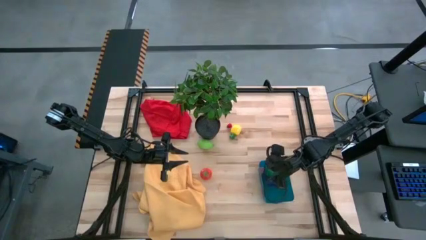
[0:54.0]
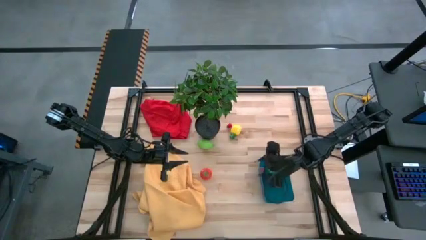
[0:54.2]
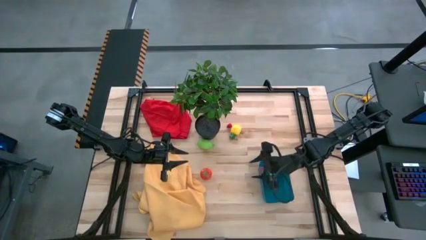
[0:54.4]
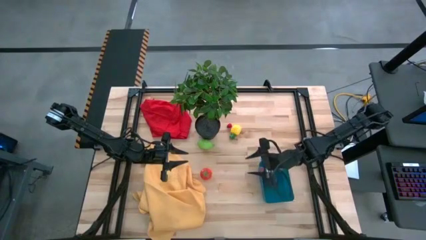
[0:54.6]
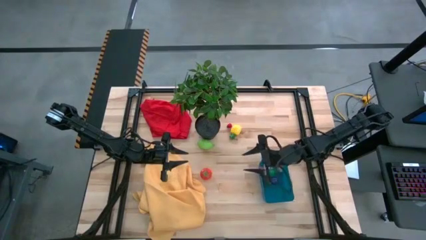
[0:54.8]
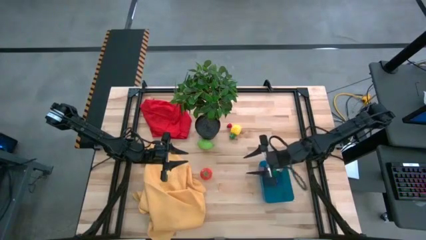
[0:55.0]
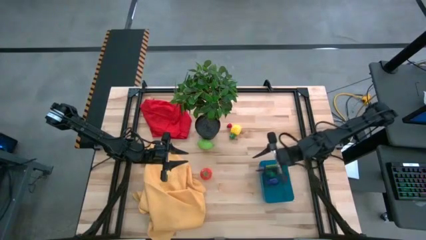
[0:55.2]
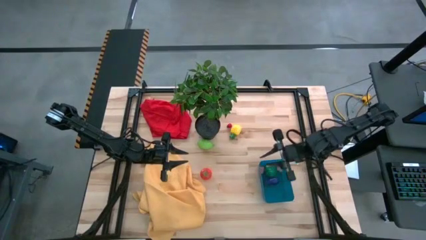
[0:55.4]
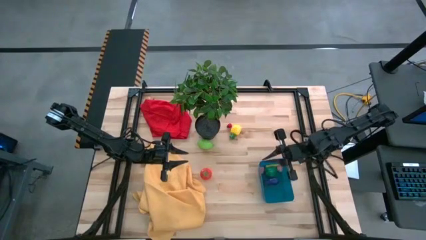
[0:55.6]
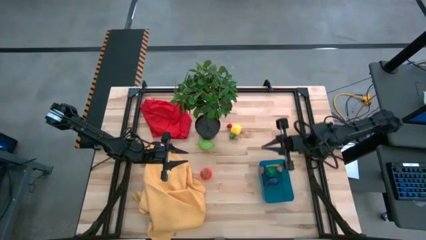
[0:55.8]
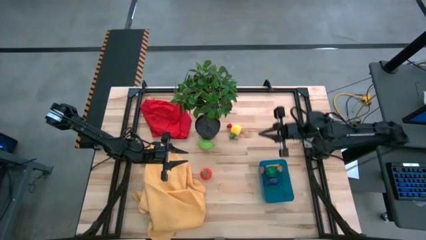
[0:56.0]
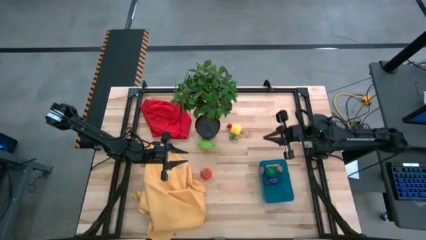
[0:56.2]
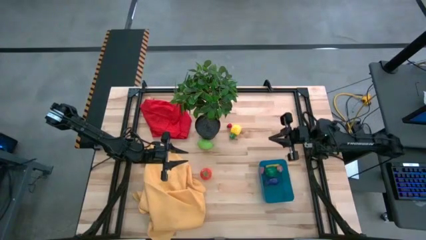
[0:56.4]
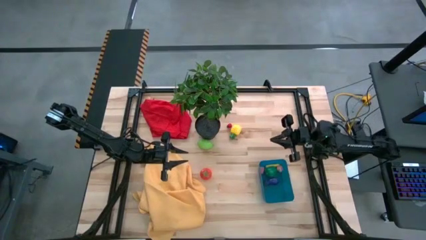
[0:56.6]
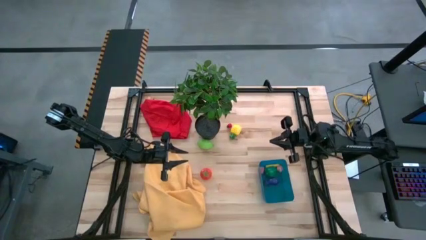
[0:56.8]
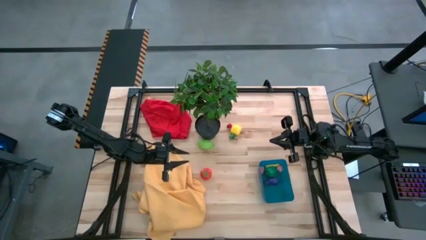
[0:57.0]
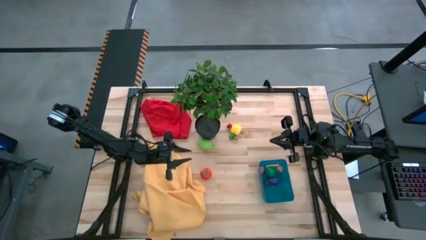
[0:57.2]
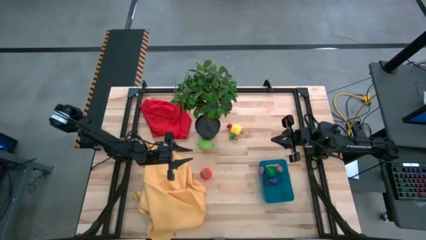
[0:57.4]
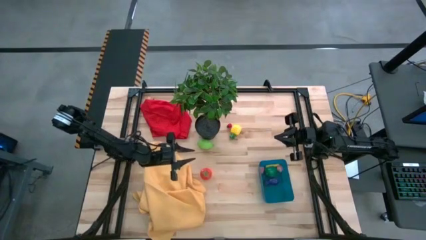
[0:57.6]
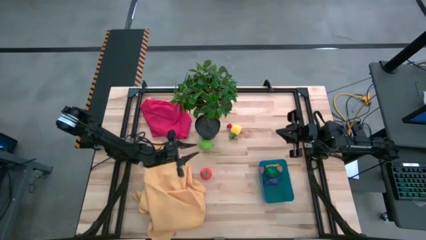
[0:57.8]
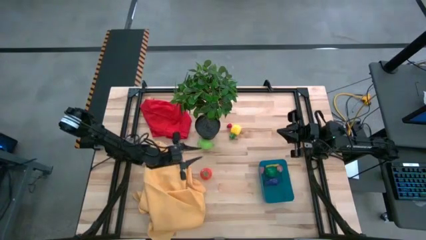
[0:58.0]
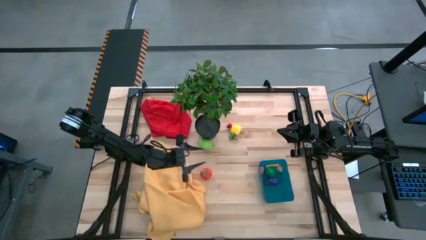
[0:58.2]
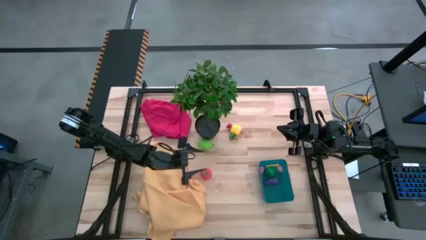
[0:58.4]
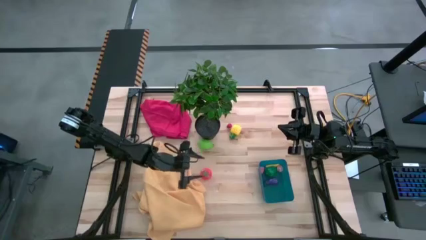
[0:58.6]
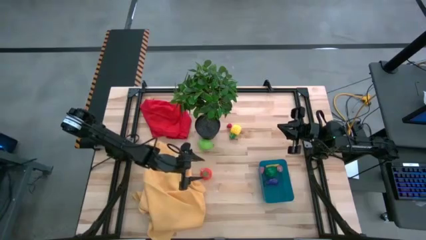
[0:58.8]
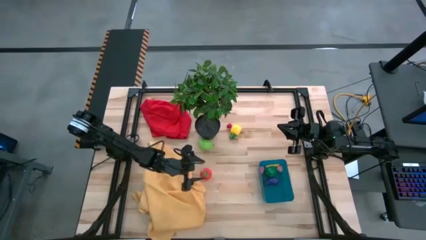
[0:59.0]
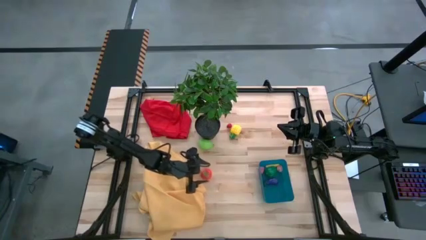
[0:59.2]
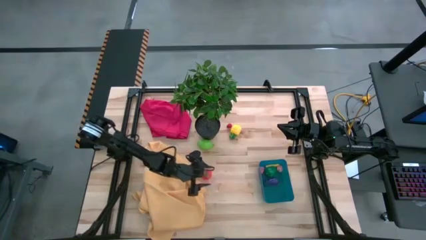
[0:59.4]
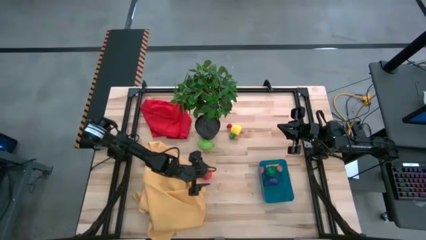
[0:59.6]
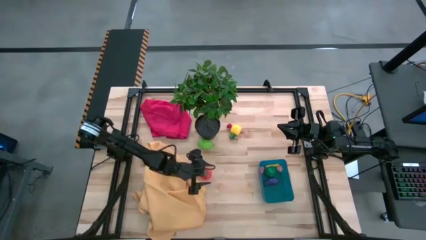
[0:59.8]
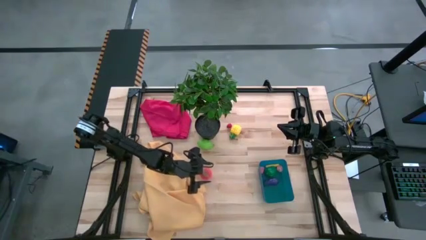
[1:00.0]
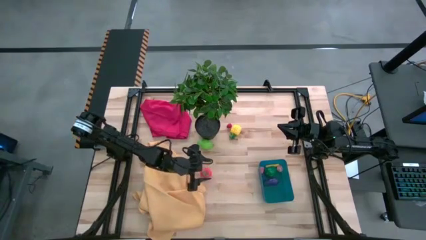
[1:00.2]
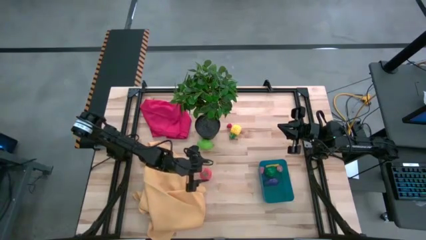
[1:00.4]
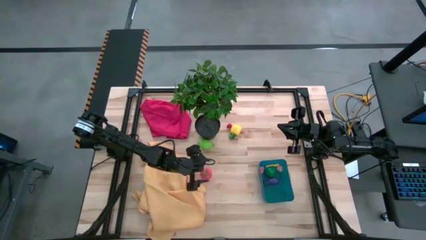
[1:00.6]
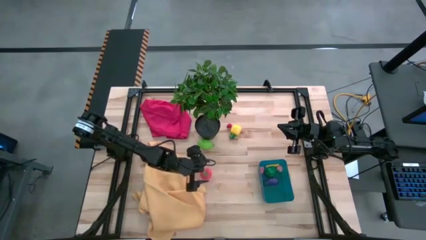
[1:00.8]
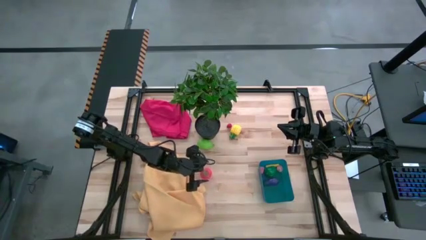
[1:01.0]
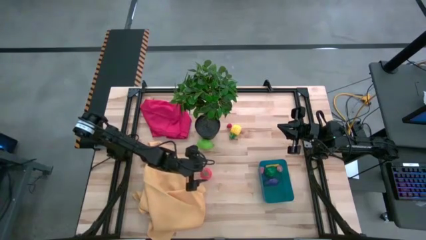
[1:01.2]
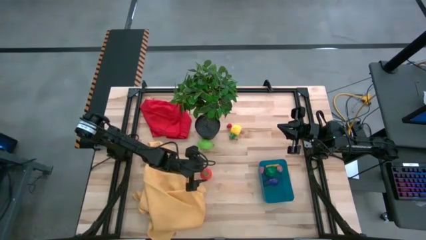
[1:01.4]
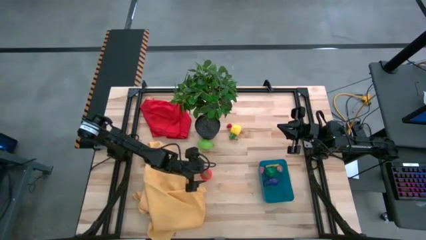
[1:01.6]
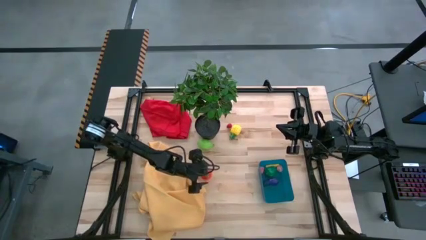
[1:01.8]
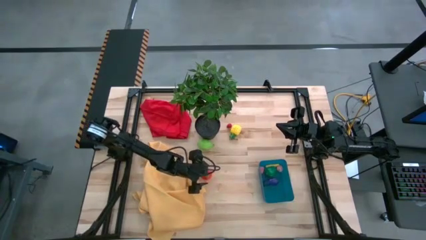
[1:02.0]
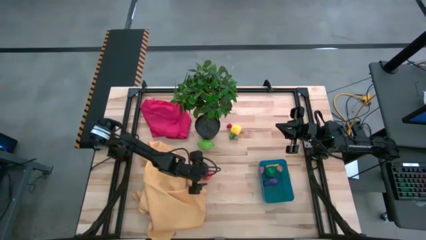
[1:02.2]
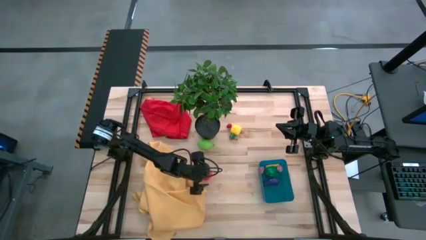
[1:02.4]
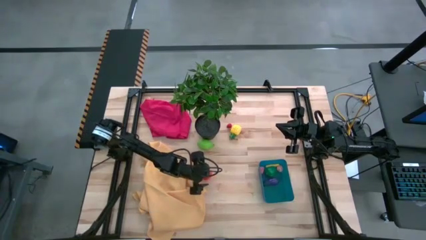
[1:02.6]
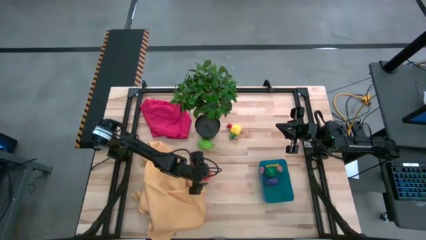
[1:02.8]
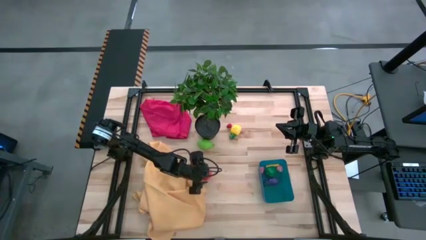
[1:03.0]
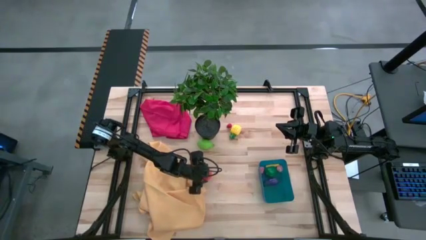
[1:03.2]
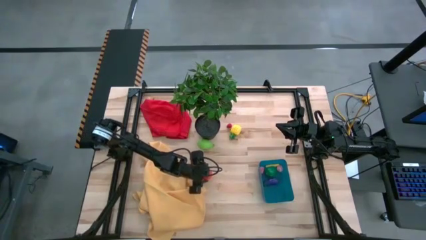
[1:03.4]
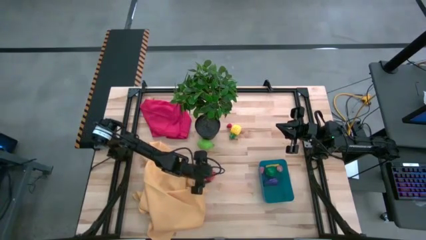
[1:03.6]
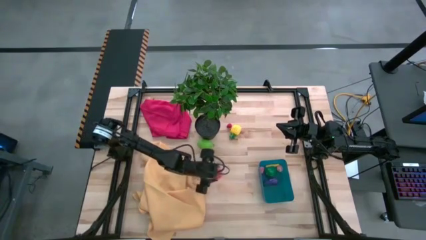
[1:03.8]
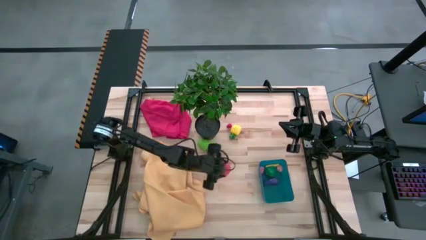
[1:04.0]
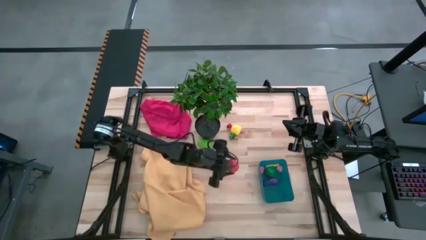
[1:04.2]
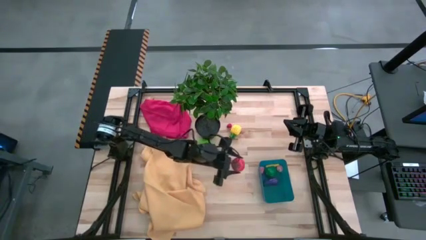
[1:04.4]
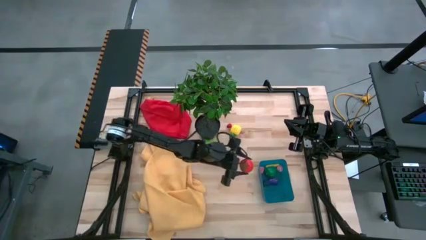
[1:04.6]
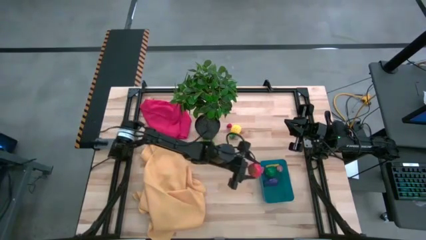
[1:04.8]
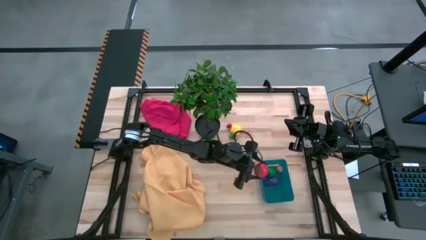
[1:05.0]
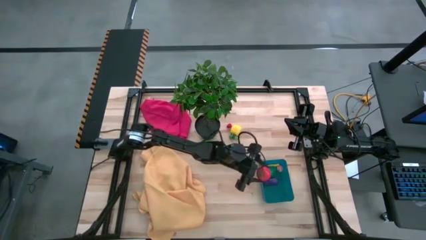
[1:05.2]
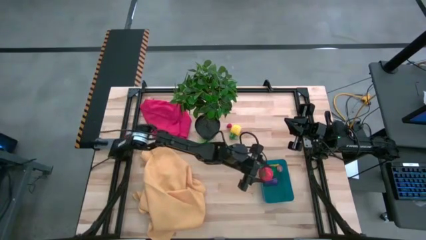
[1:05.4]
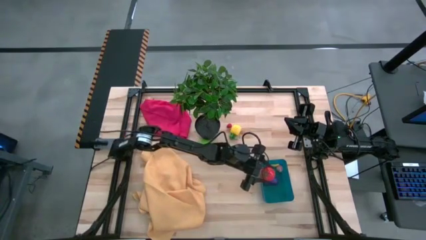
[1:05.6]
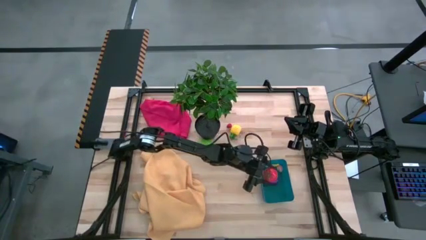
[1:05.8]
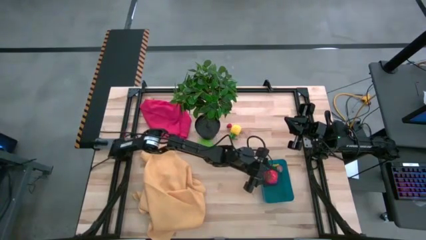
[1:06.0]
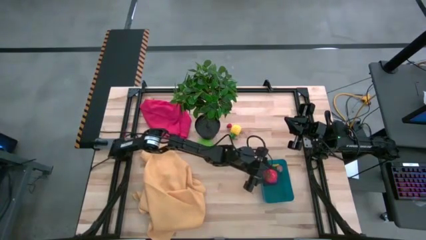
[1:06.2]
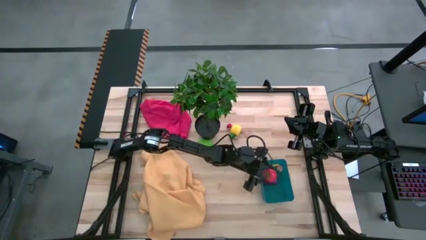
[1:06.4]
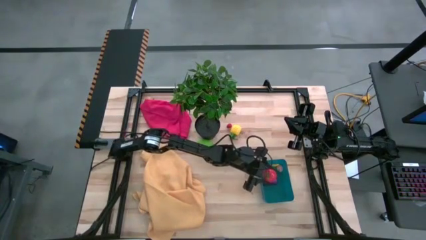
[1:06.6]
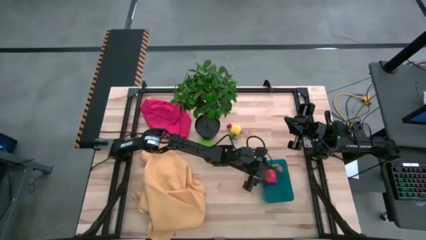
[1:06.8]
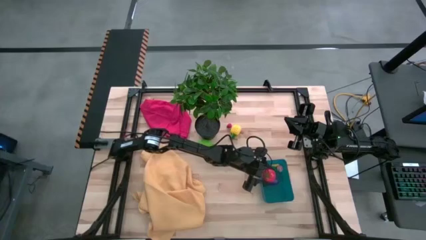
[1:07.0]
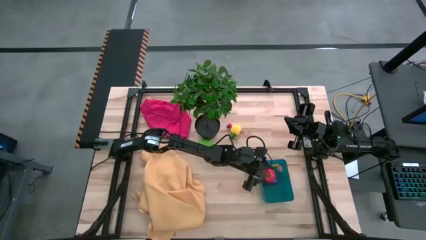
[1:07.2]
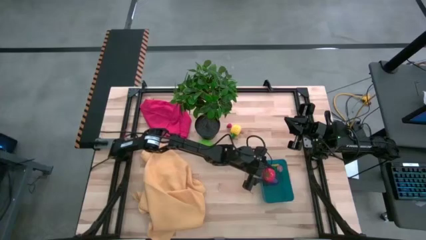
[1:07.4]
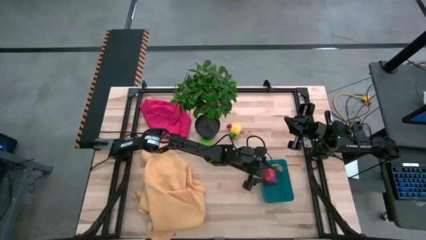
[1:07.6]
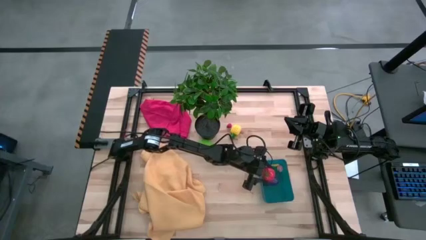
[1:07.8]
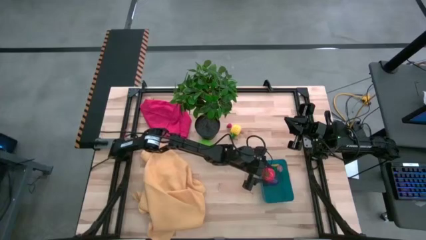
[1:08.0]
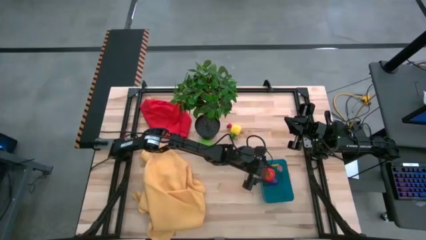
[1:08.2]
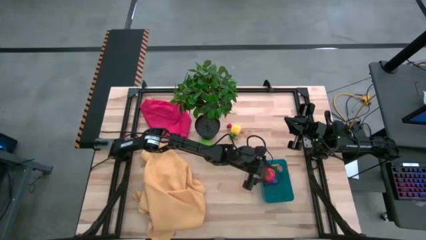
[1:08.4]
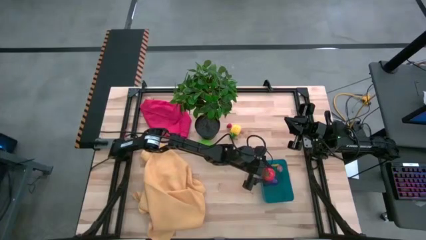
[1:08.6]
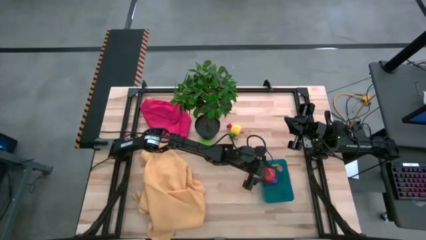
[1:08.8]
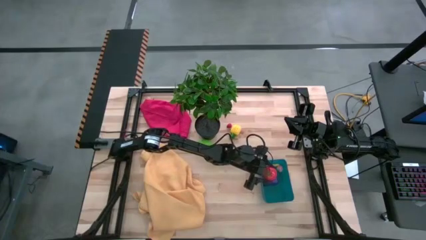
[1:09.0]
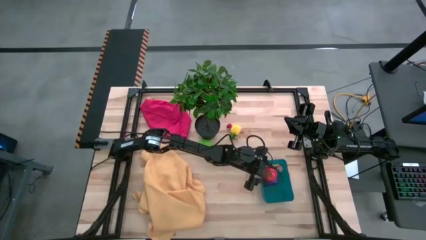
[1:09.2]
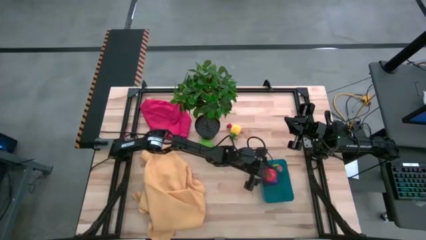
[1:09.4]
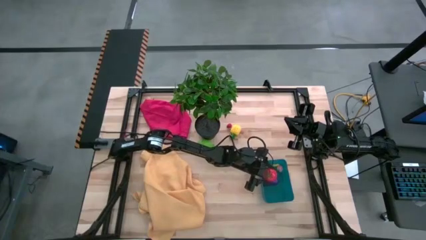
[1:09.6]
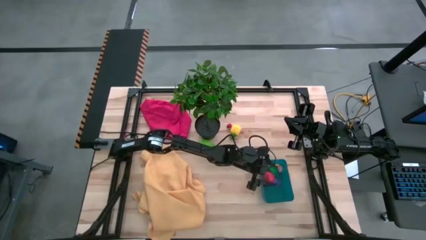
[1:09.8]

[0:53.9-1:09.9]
Task: Pick and placing Produce into tupperware
Put the tomato into the bin
